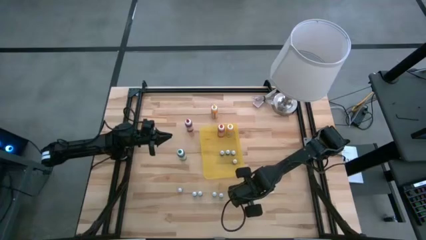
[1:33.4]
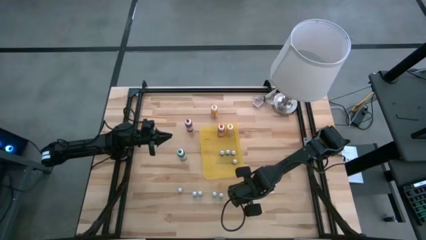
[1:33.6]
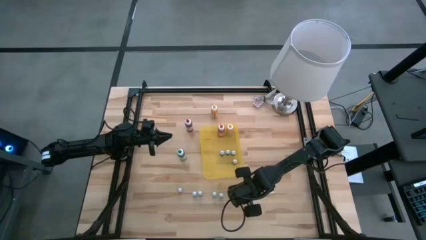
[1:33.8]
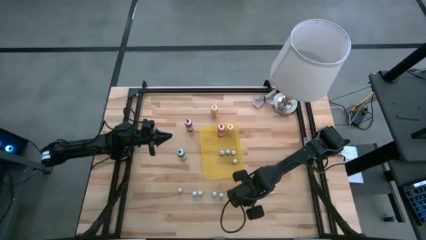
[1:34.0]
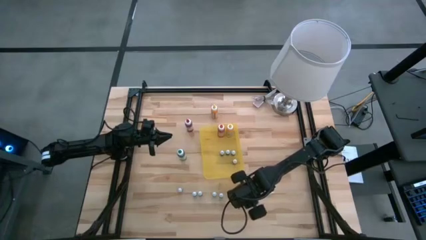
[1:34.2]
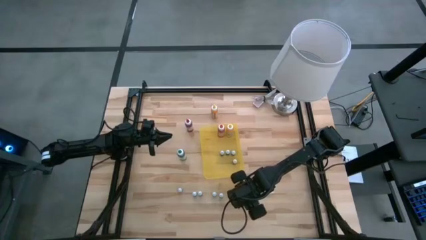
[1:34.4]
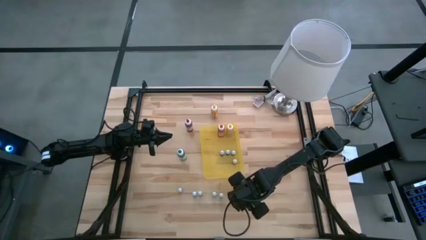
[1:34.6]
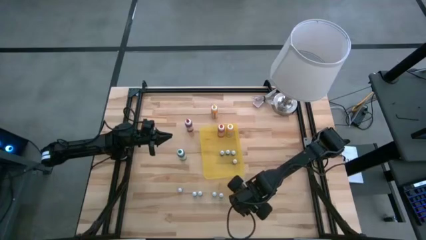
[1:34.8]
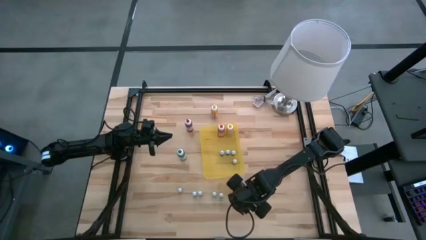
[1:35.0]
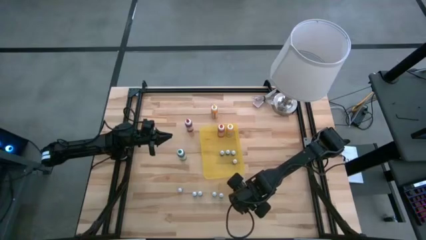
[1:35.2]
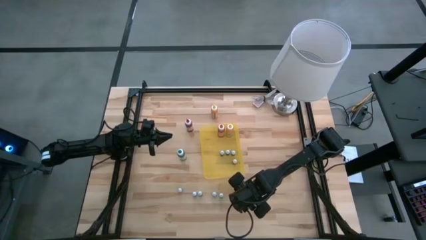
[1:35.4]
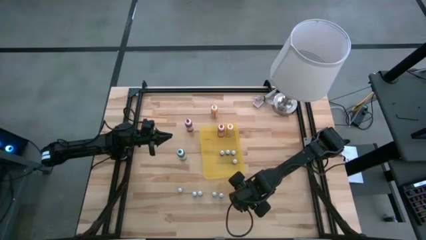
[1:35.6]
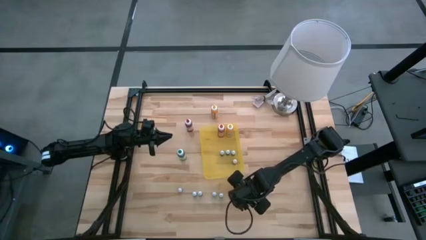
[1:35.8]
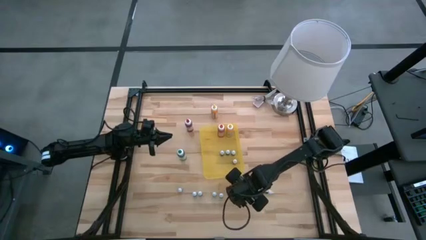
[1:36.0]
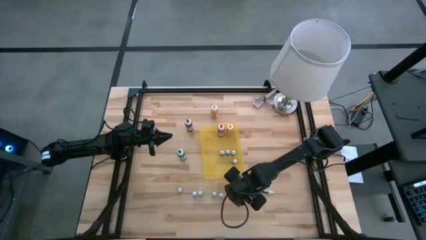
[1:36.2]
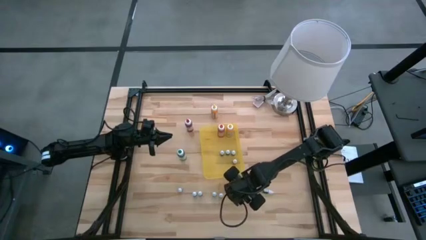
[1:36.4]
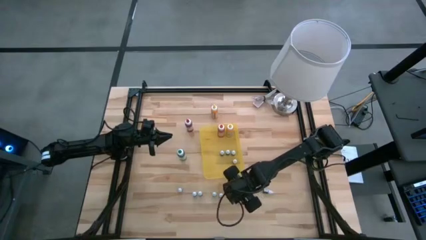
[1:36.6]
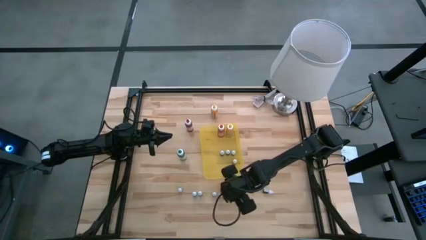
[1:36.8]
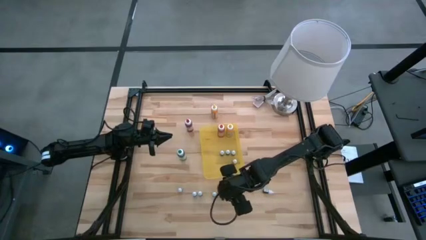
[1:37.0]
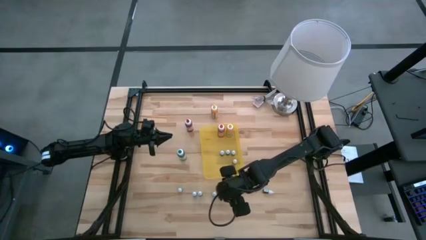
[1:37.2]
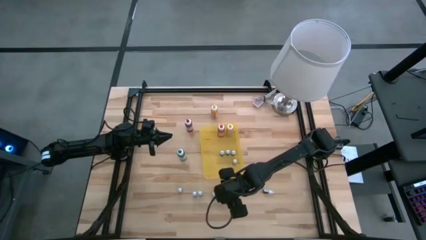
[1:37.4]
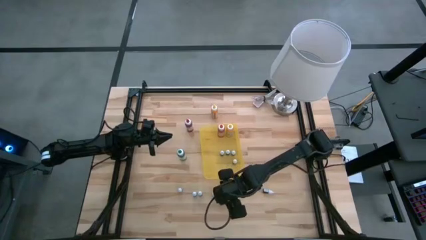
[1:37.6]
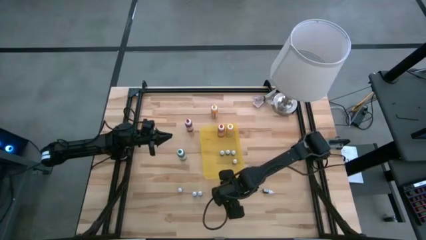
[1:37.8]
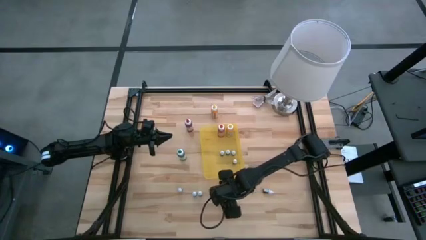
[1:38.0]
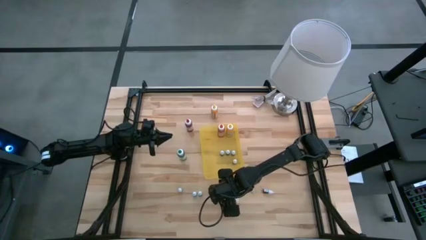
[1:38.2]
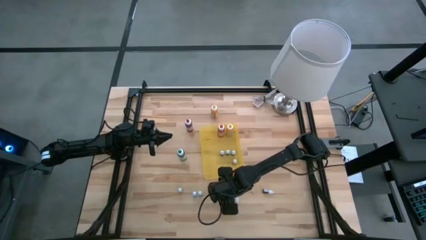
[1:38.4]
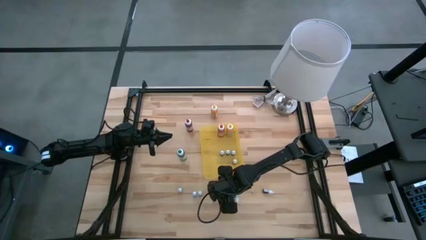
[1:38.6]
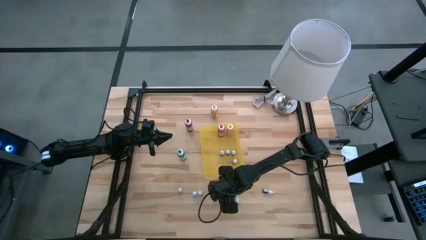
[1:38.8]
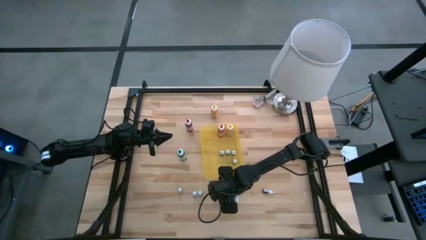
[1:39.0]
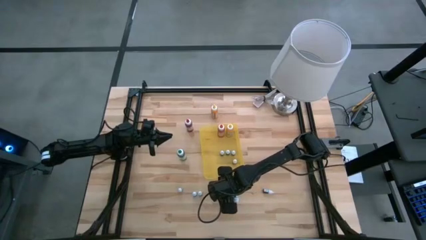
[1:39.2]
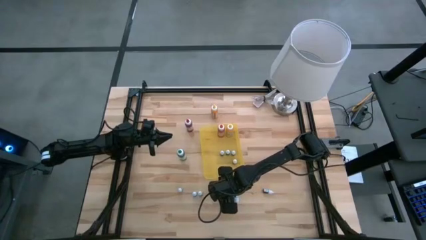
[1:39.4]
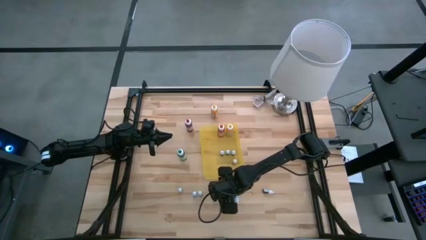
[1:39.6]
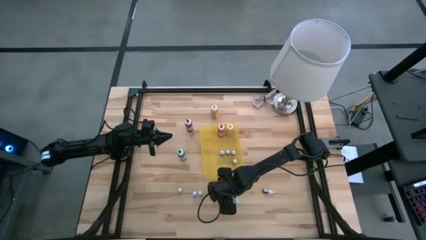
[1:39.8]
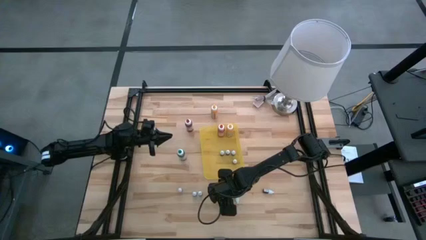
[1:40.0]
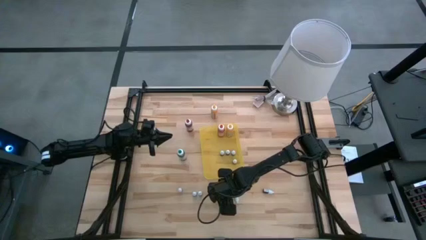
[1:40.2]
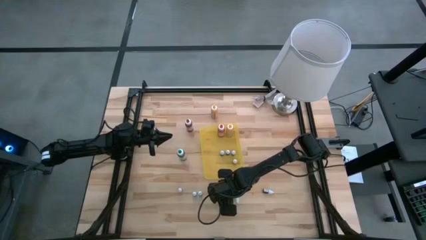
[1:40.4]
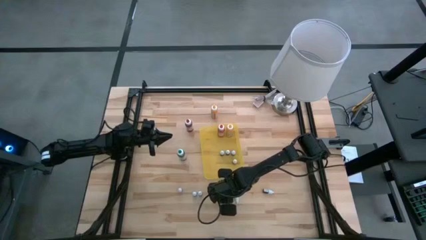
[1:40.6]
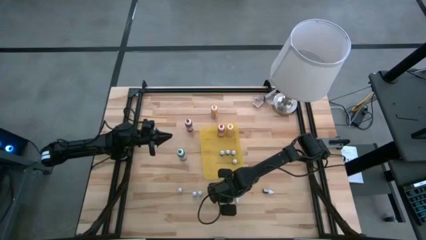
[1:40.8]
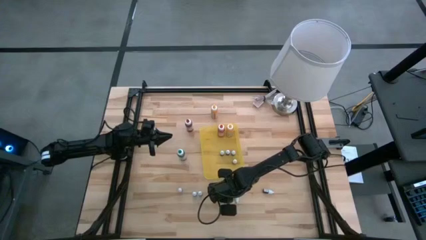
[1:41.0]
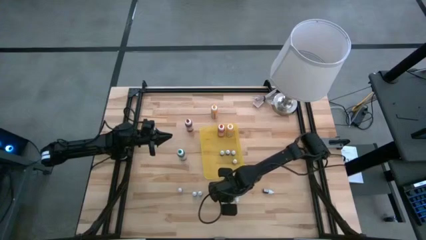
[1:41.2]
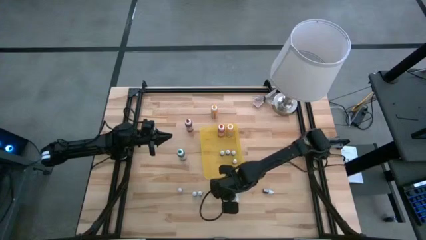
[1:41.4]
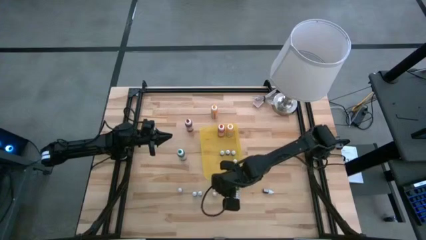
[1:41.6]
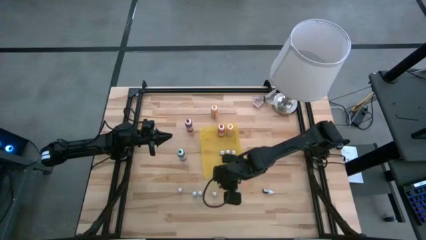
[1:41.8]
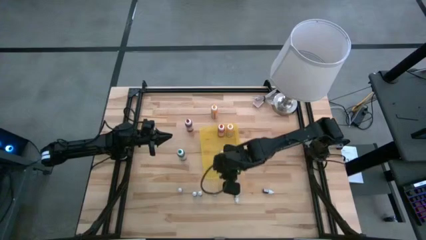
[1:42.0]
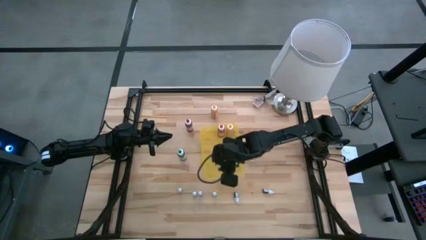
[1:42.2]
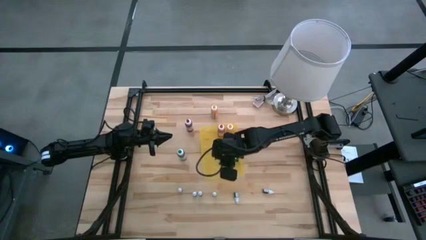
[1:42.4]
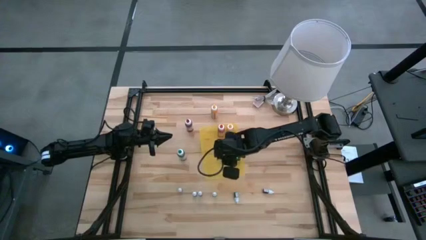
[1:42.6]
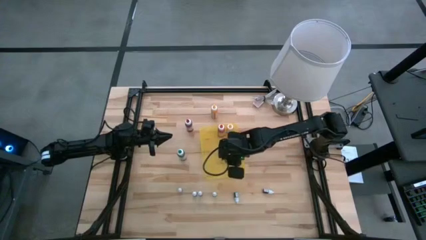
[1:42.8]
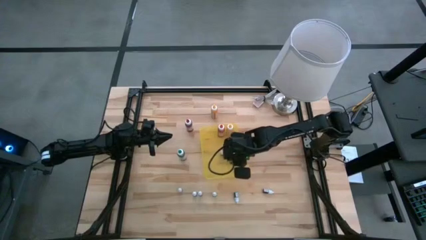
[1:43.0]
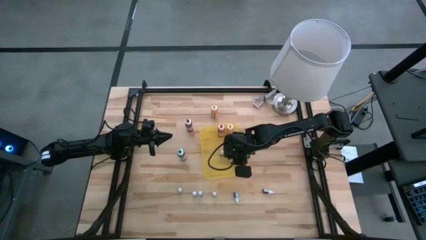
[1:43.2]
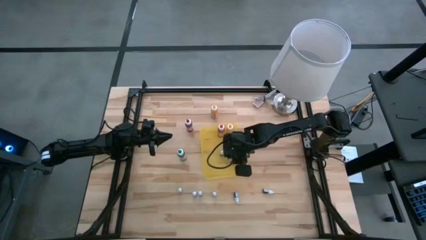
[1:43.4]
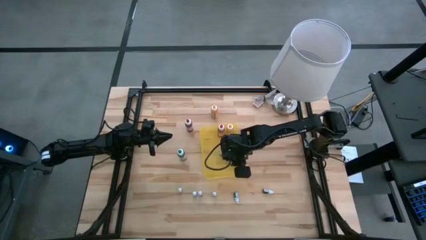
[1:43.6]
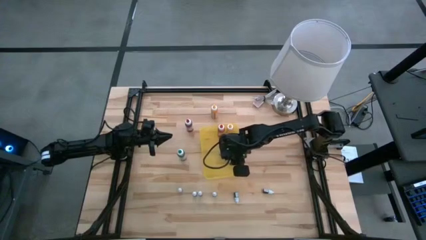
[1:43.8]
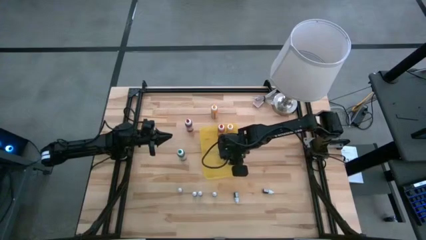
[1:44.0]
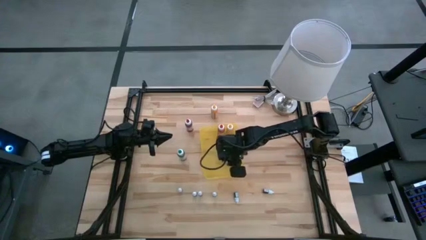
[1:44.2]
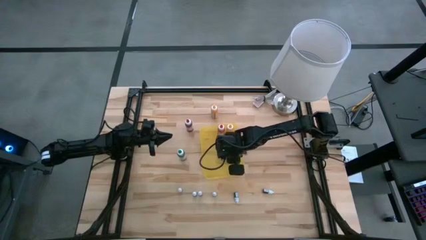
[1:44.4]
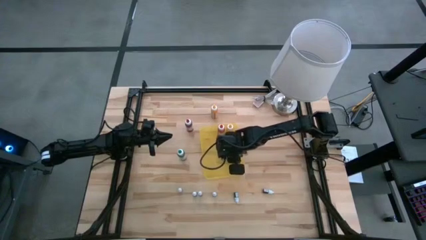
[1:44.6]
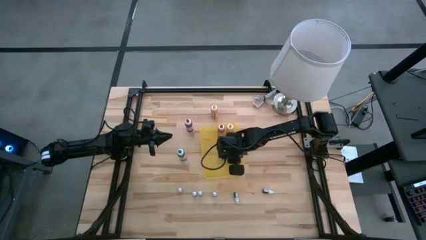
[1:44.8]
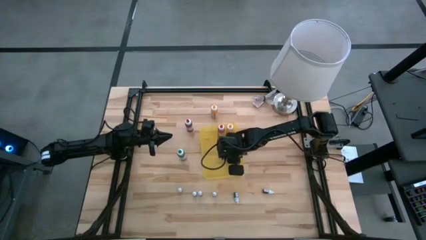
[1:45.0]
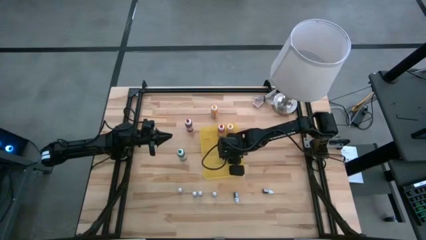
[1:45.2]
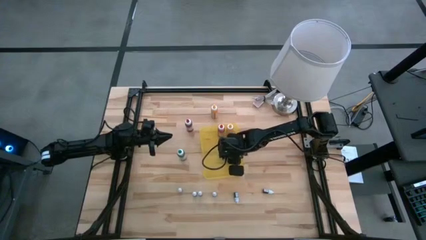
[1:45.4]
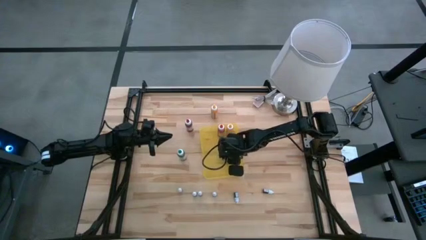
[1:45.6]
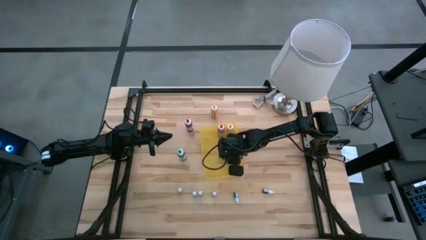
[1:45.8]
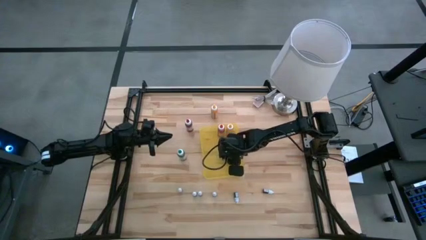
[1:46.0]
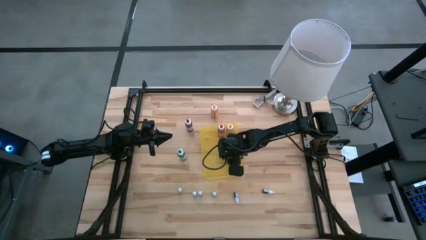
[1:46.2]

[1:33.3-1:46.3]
Task: Pick & Place food coloring
Put the right small blue food coloring bottle into the bin

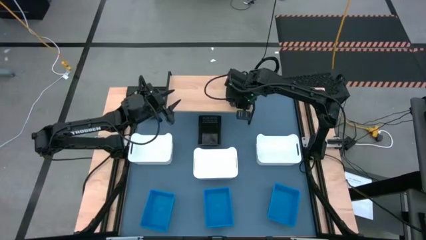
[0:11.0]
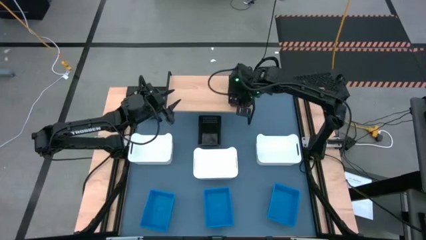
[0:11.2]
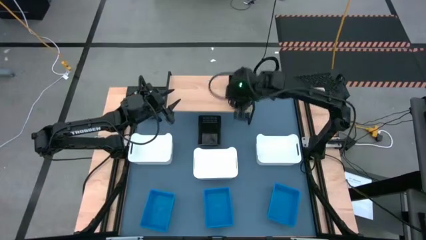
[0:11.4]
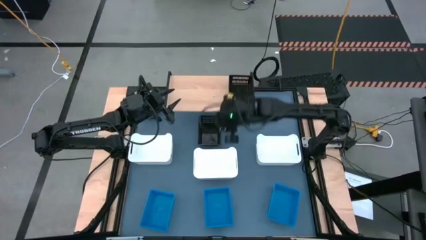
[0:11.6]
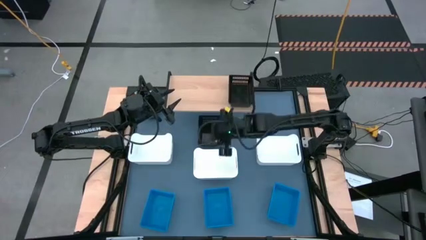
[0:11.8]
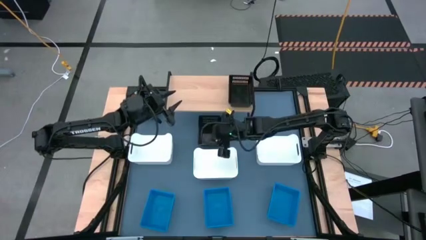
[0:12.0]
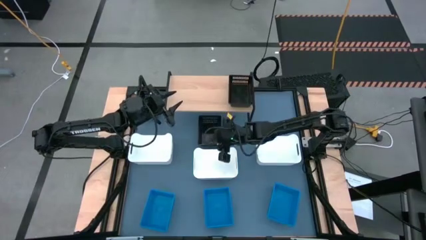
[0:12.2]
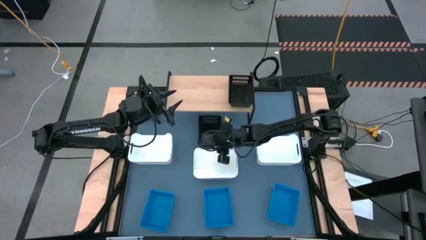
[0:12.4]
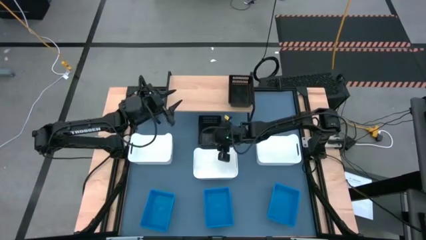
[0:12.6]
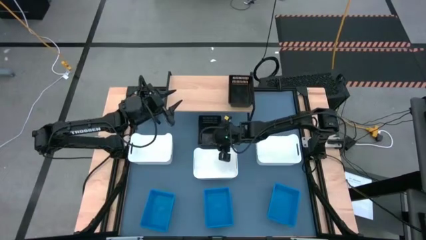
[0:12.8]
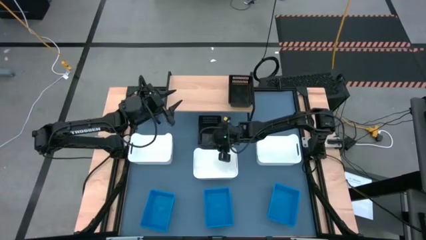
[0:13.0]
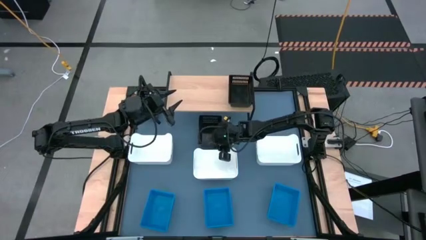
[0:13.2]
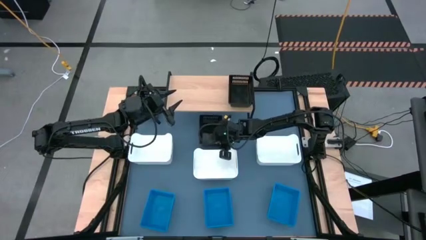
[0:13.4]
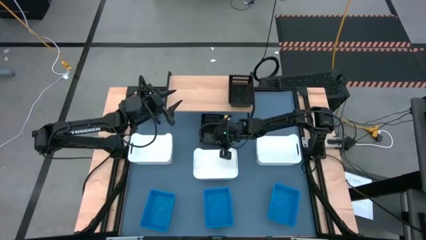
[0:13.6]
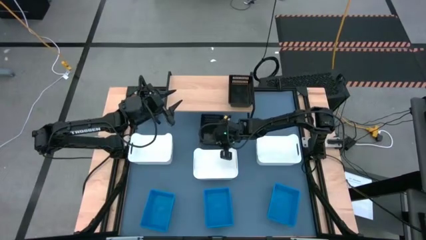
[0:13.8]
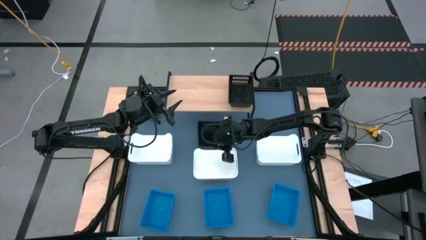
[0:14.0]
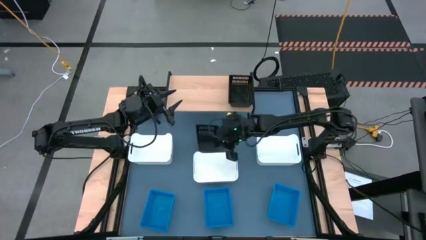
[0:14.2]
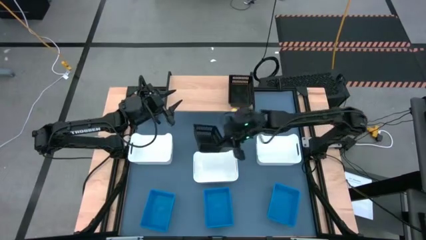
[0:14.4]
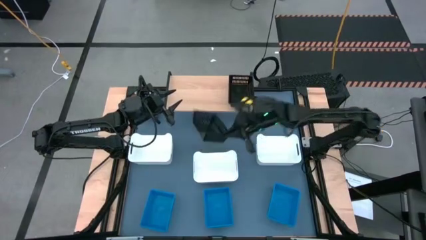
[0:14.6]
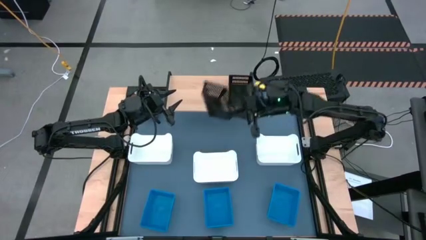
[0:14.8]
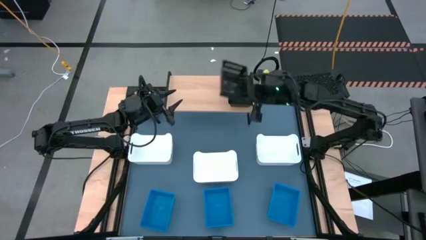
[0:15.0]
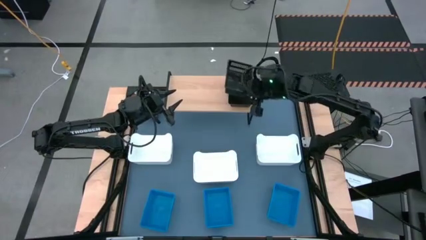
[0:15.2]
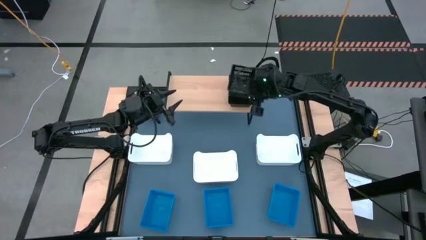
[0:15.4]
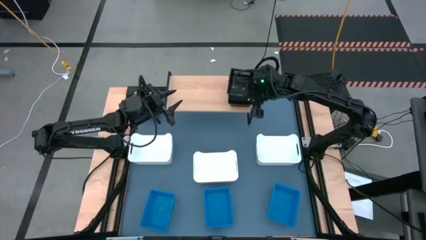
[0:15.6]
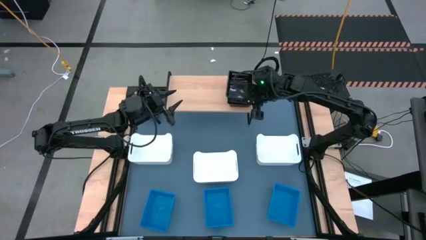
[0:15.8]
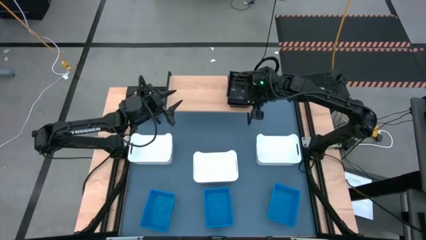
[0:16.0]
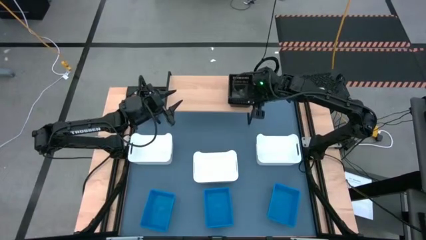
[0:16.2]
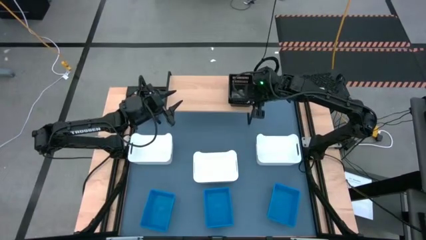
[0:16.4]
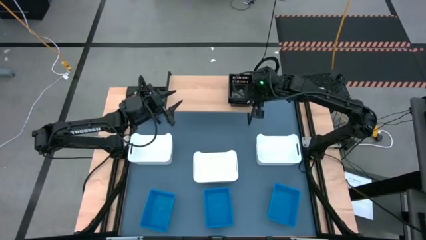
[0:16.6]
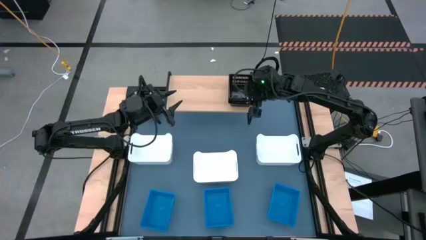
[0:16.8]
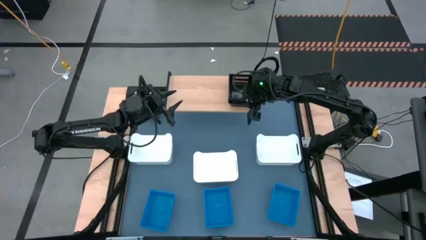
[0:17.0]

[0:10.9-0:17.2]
Task: Stack baskets on shelf by color
Stack the bottom black bin on the black bin on the shelf
